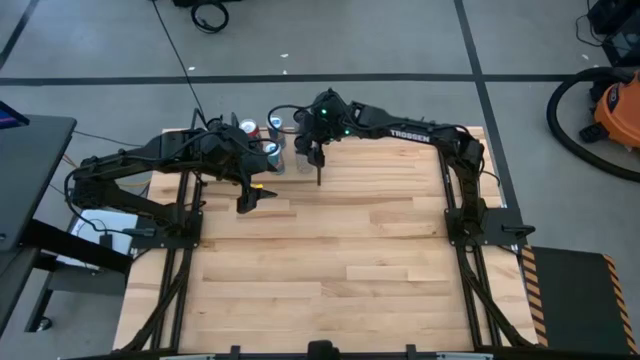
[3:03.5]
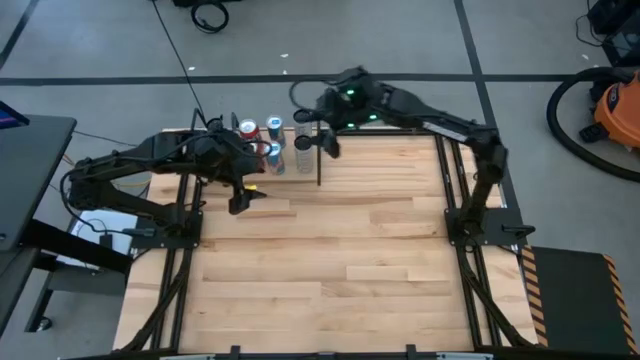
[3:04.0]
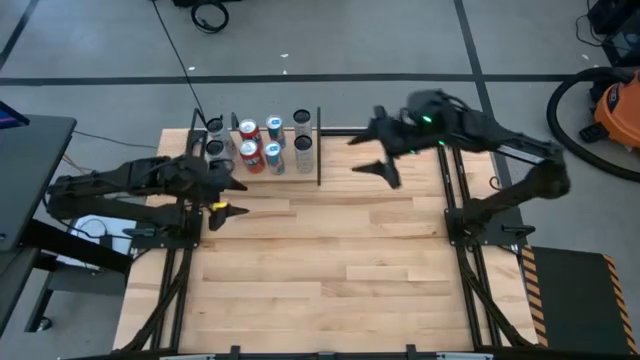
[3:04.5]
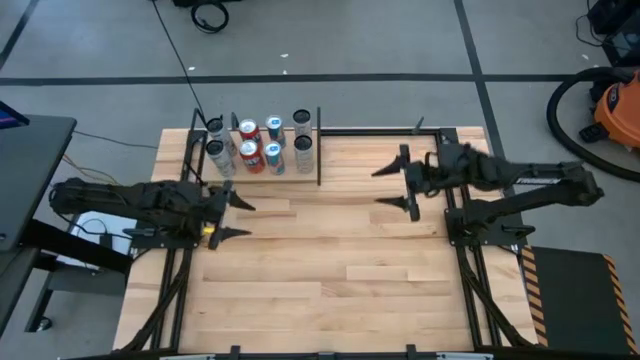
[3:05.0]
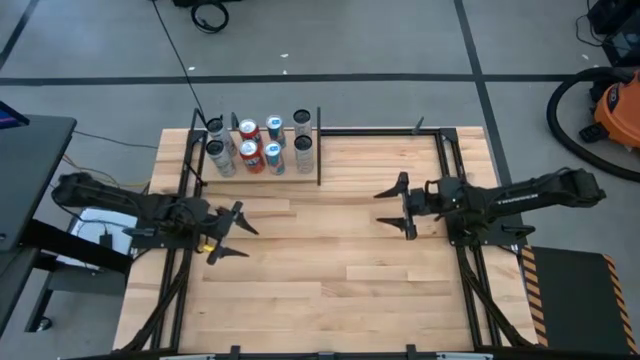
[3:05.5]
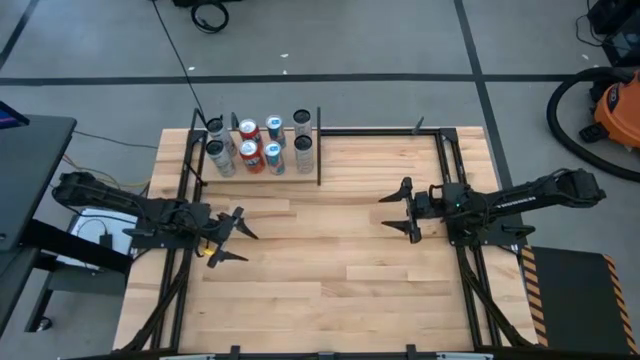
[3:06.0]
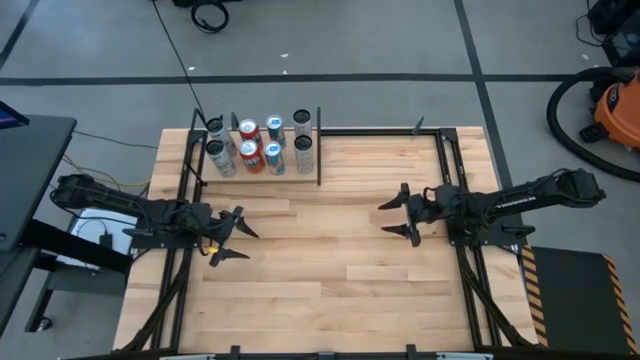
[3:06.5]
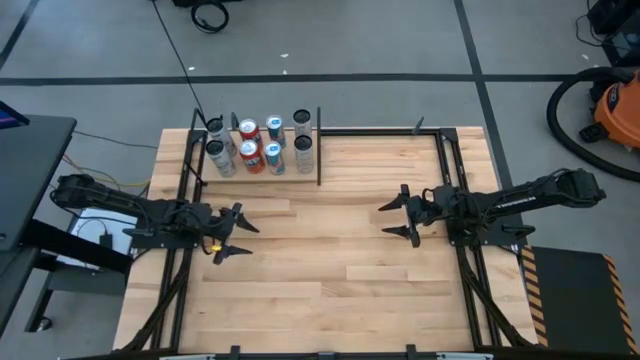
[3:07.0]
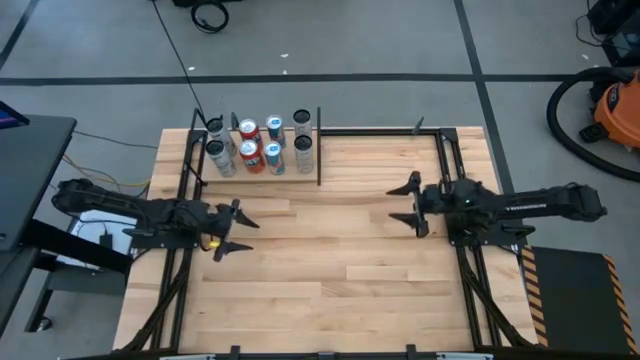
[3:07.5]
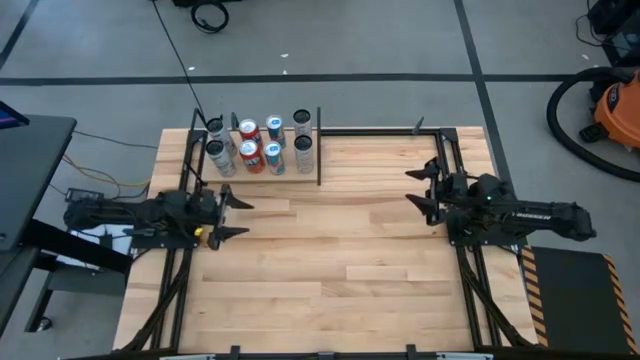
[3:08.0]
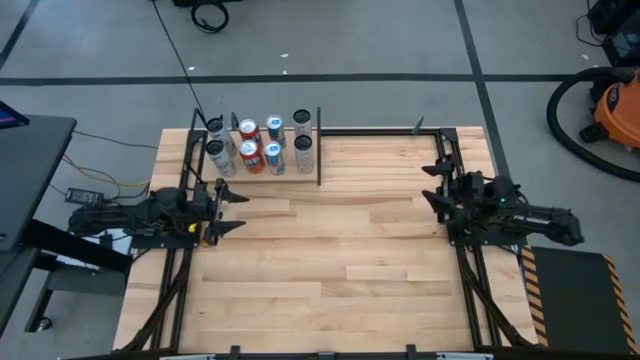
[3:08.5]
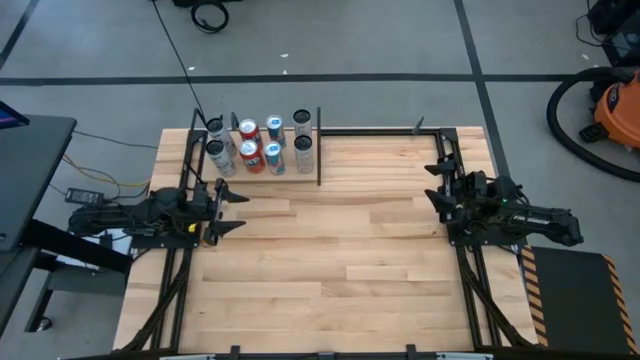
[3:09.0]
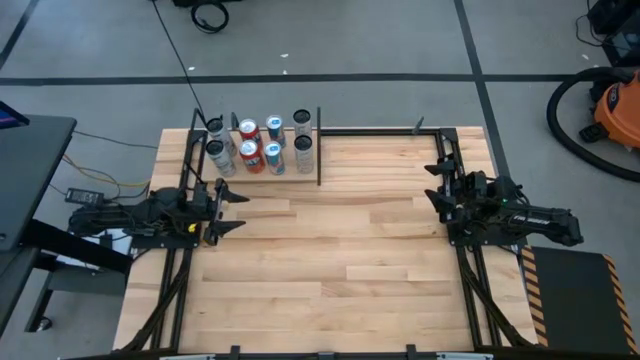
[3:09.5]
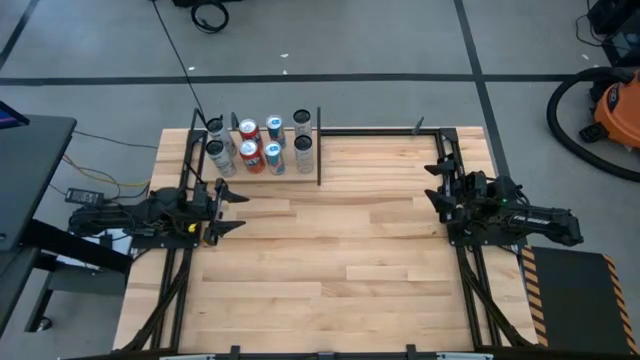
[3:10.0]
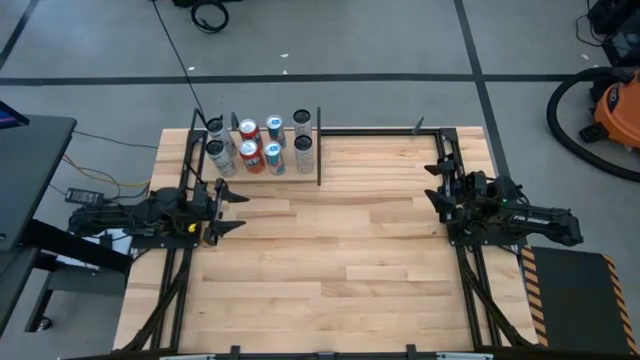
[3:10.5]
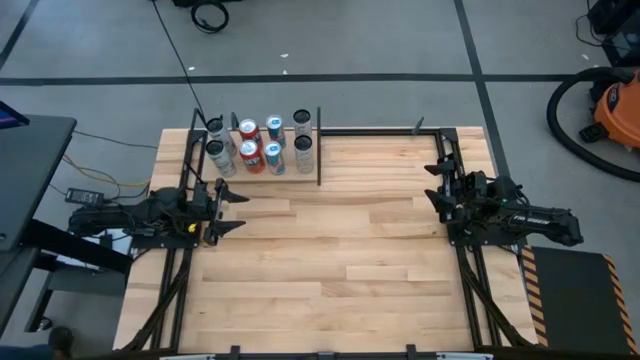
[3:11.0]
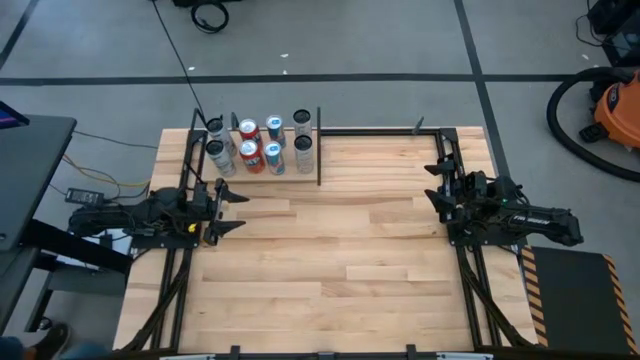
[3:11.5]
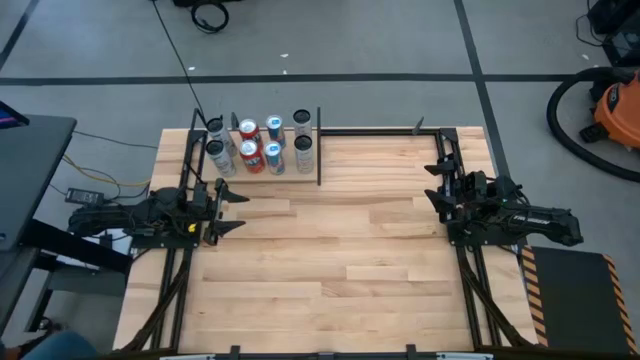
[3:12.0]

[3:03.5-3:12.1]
Task: Place canned beverage on shelf
Return to Home Position

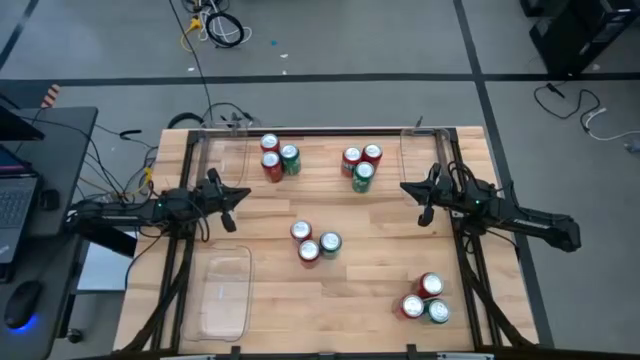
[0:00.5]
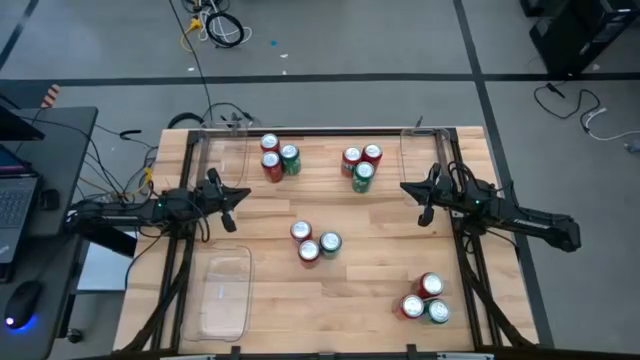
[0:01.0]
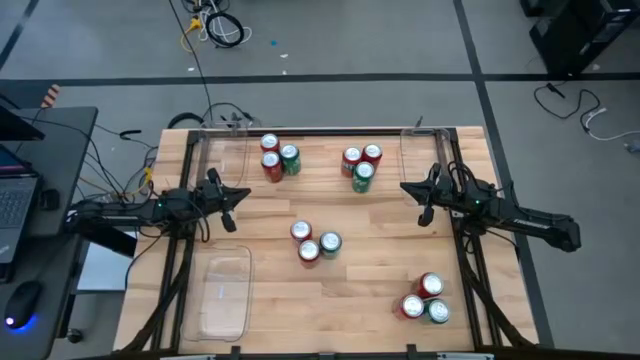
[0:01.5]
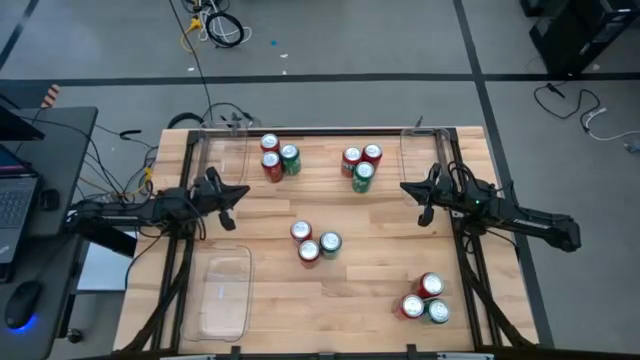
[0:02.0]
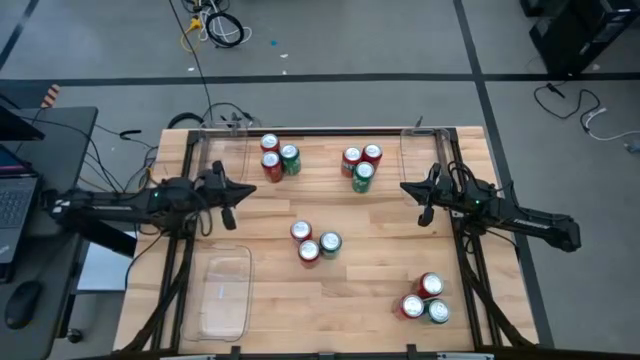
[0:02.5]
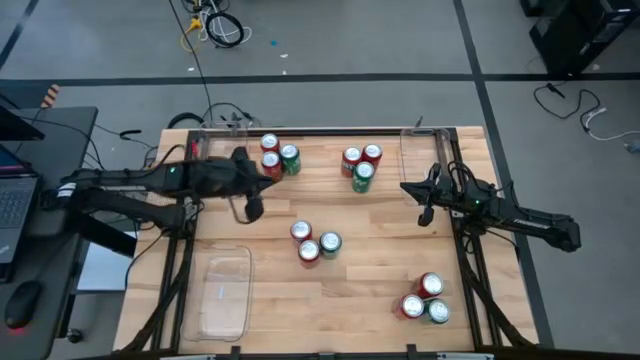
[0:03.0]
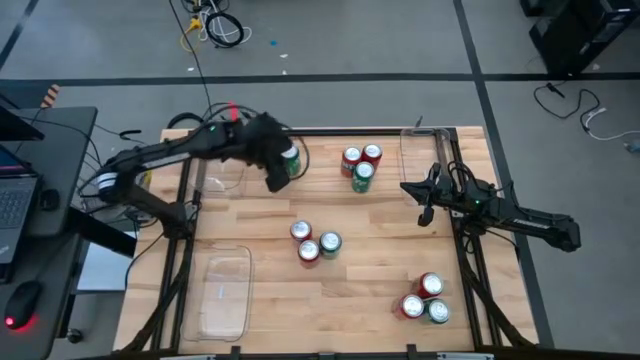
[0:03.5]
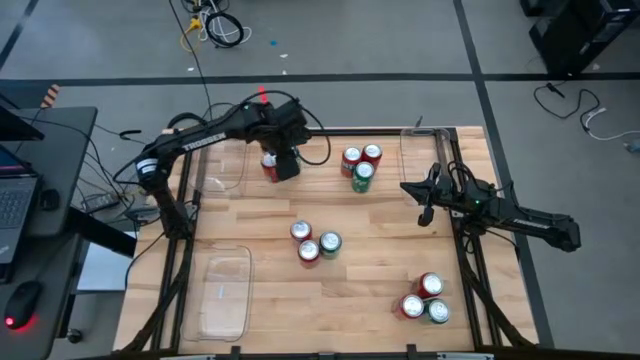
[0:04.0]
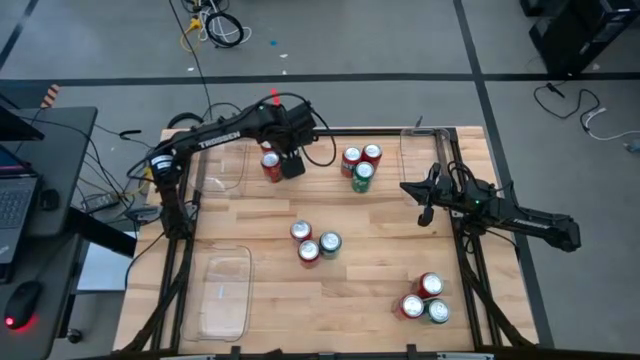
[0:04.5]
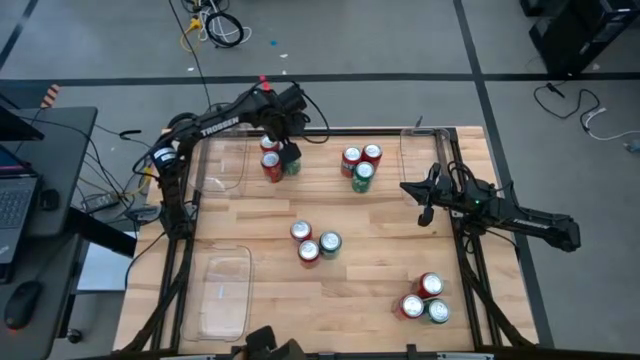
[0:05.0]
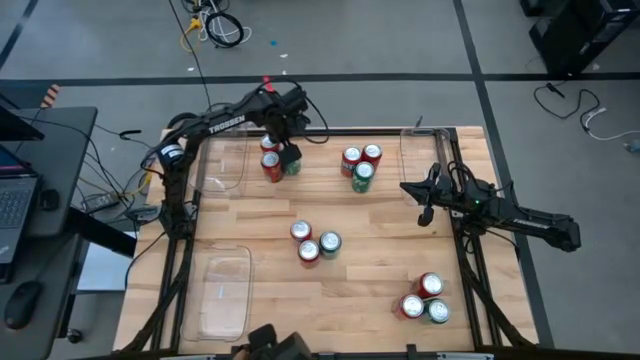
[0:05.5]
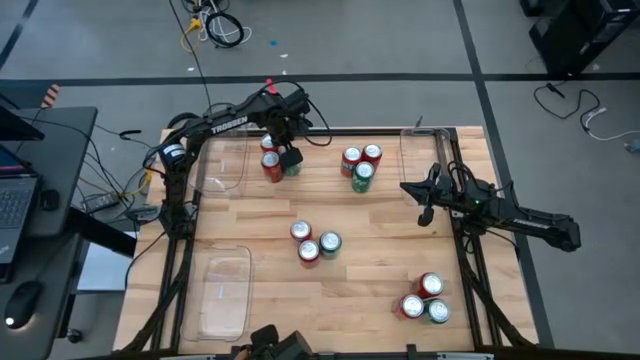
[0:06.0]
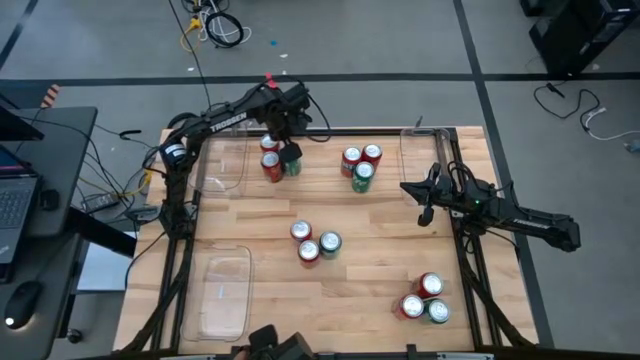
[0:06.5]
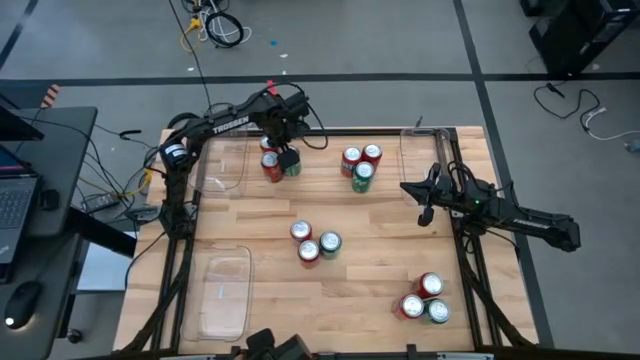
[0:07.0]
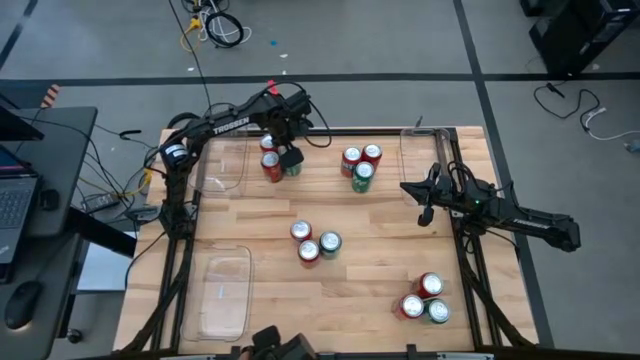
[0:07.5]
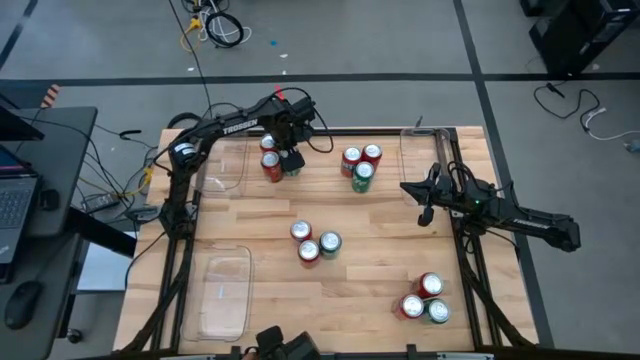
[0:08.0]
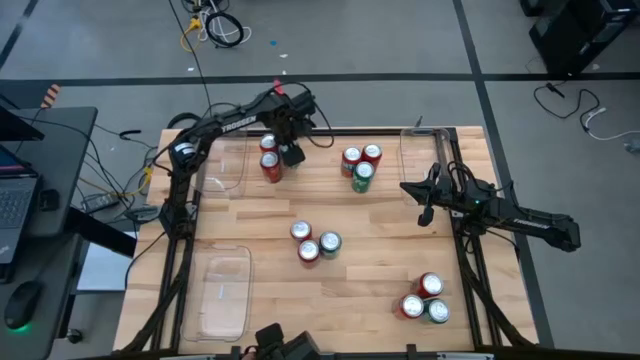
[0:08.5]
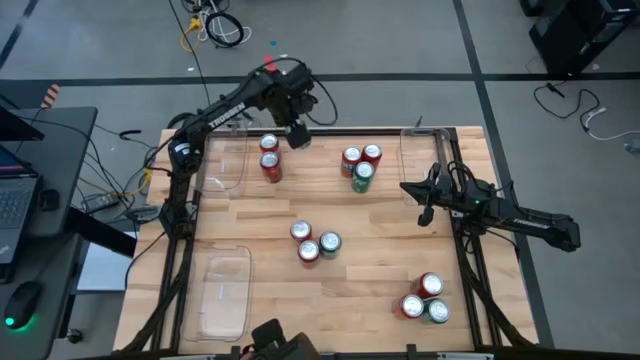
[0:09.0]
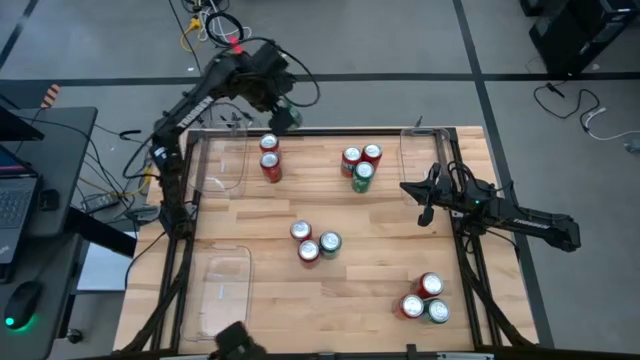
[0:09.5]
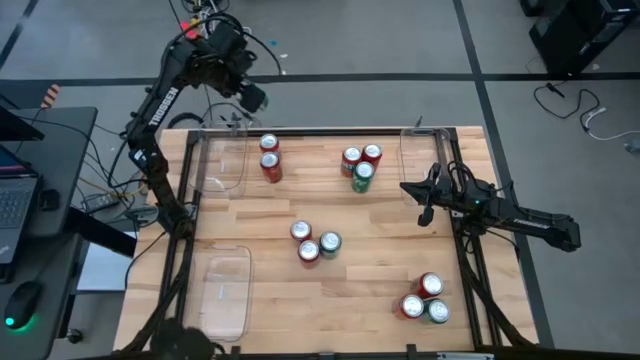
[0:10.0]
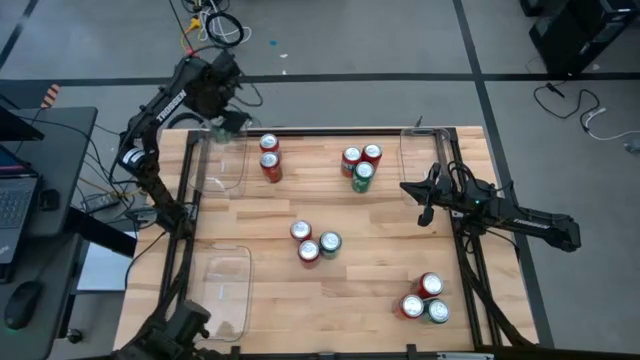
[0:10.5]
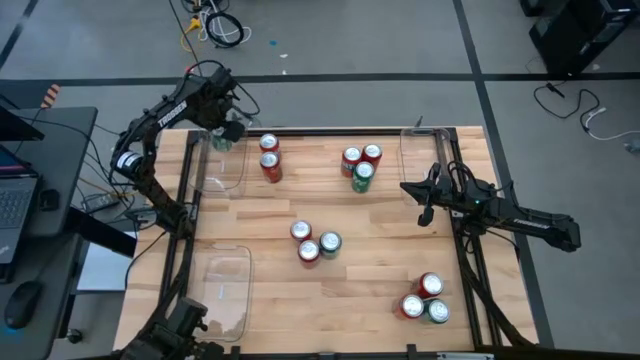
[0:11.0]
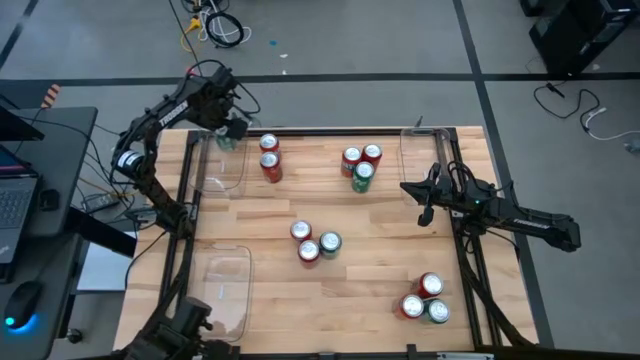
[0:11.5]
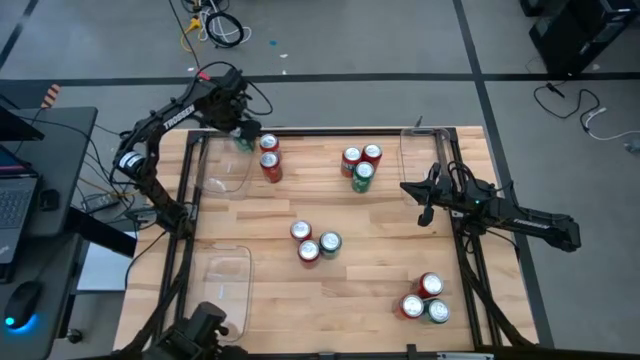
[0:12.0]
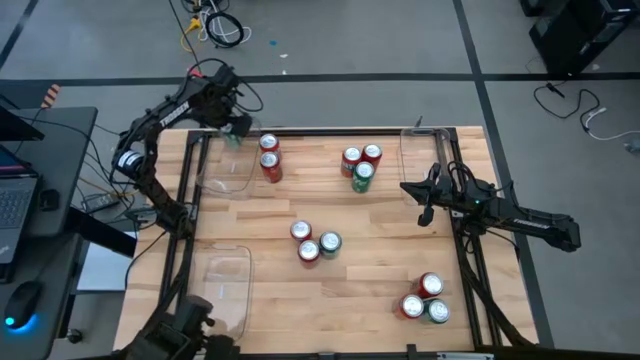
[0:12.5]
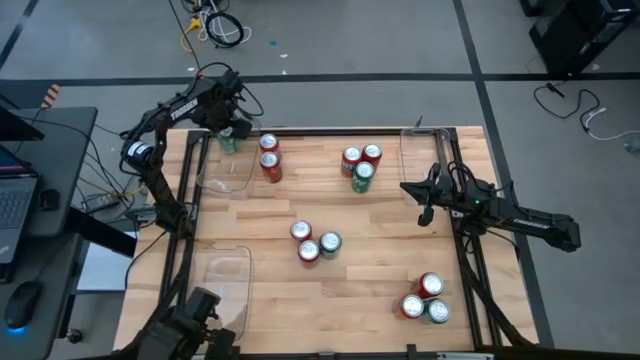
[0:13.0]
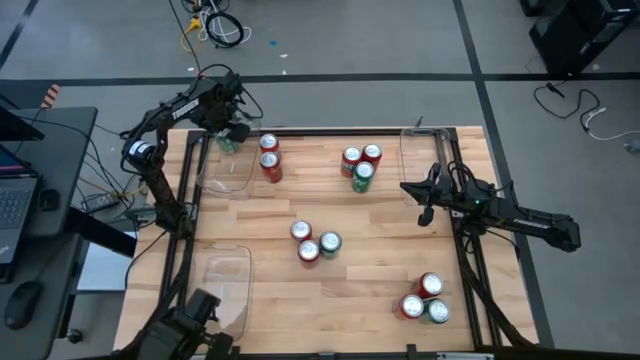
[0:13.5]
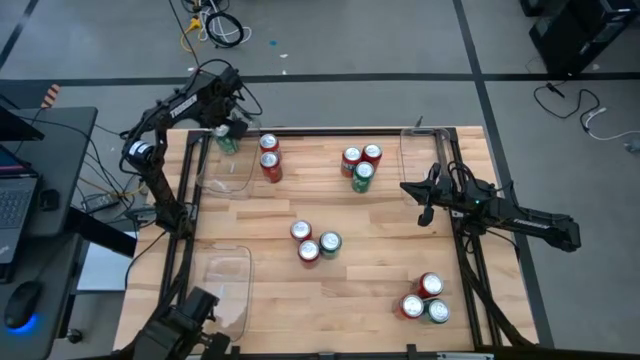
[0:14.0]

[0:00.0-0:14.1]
Task: Sort soda cans
Put the top left green soda can into the top left transparent bin
